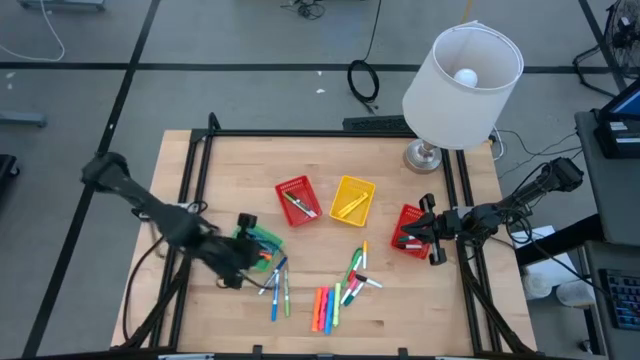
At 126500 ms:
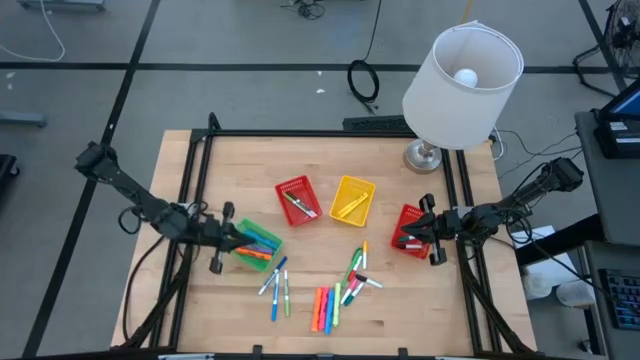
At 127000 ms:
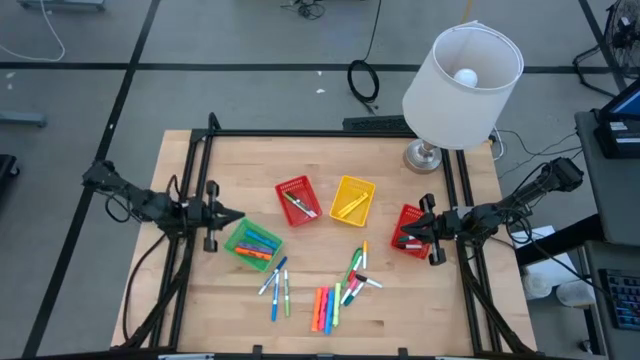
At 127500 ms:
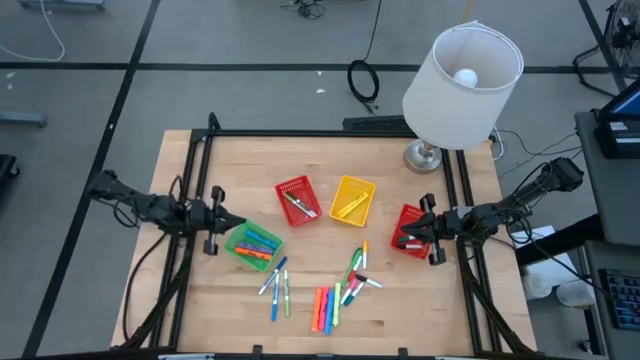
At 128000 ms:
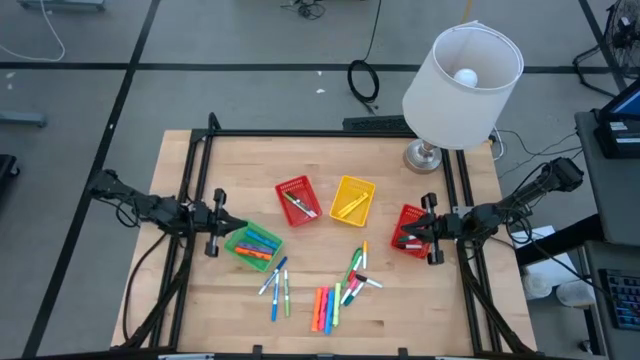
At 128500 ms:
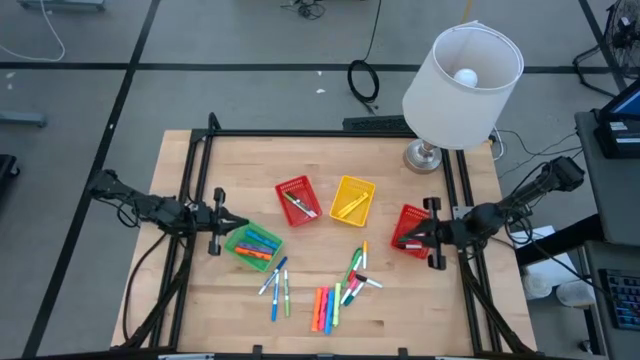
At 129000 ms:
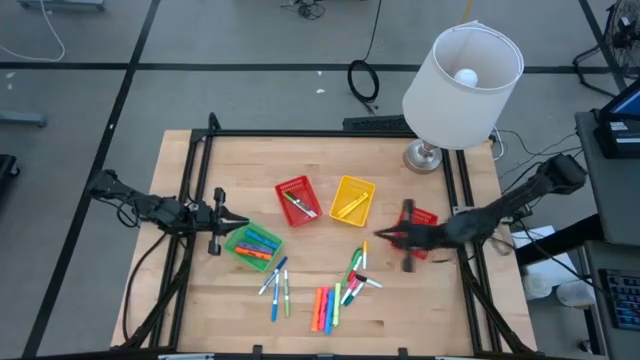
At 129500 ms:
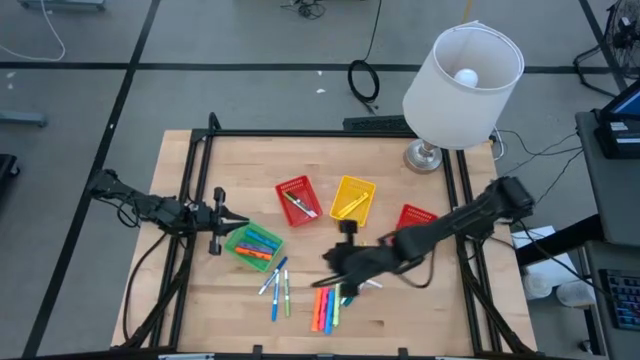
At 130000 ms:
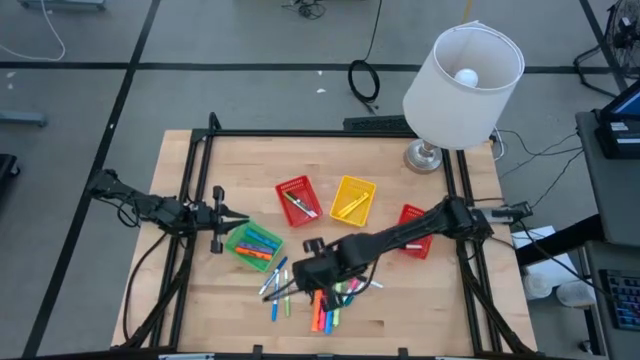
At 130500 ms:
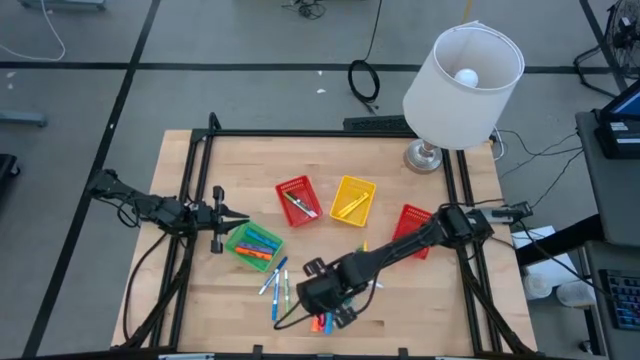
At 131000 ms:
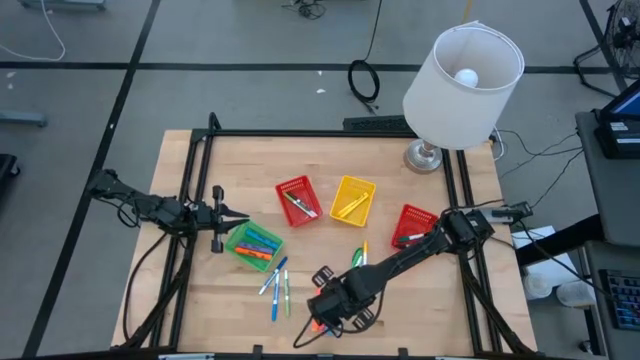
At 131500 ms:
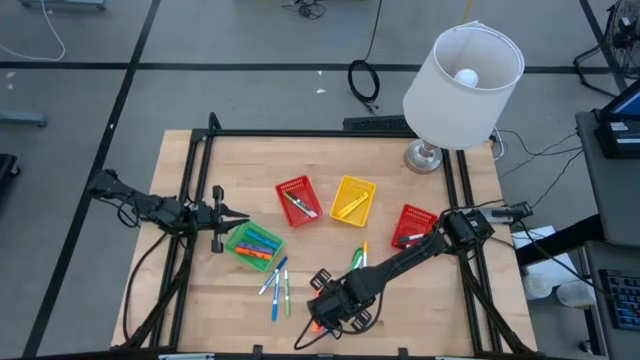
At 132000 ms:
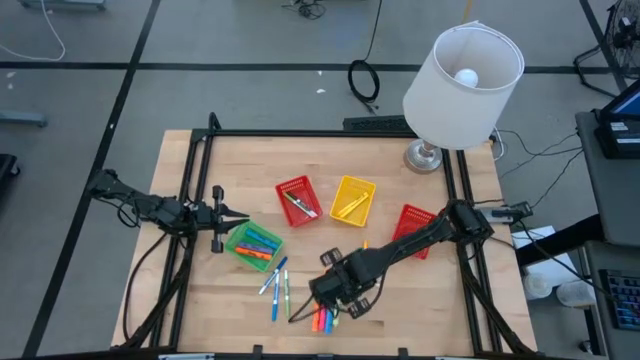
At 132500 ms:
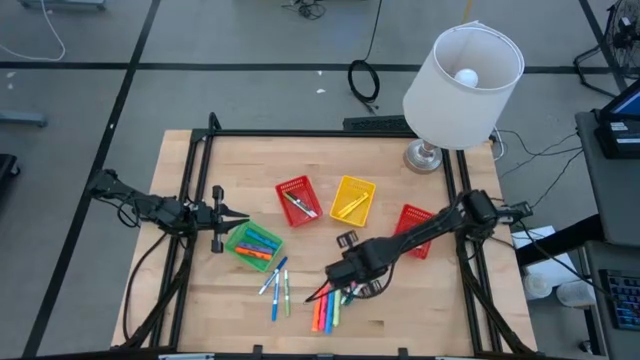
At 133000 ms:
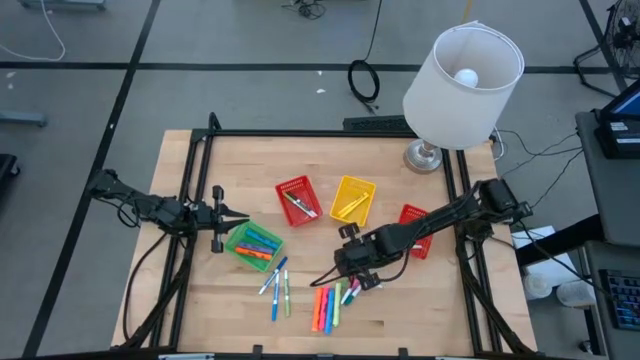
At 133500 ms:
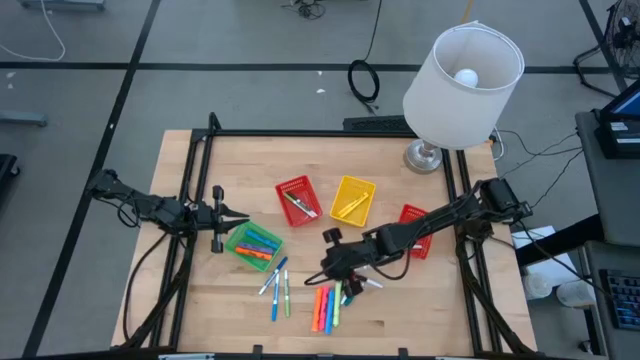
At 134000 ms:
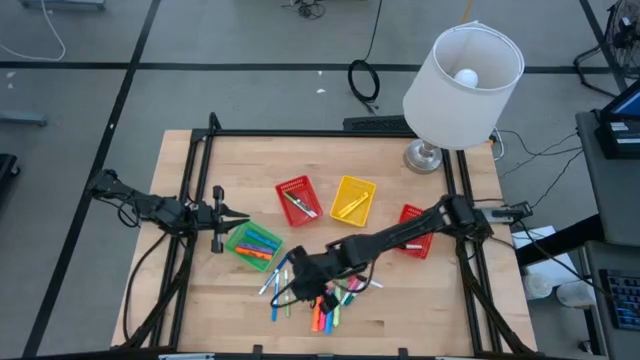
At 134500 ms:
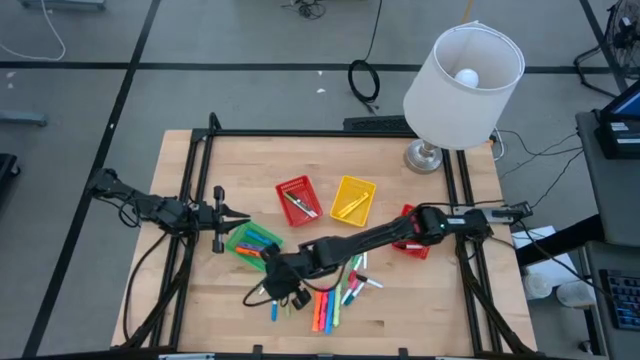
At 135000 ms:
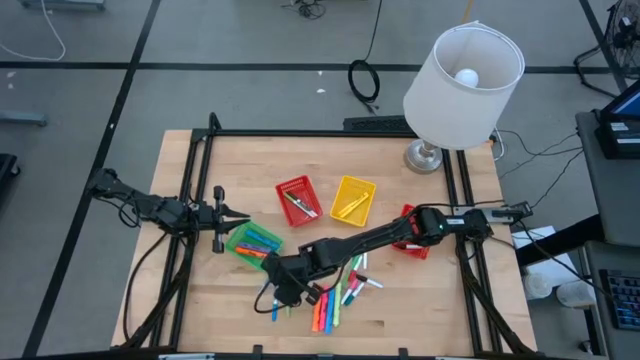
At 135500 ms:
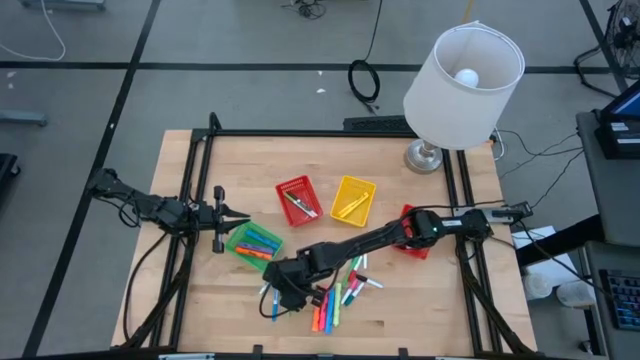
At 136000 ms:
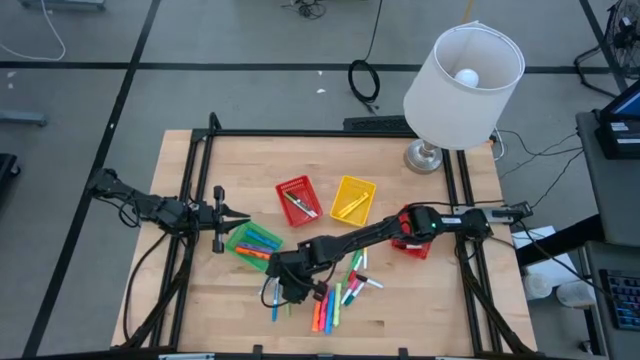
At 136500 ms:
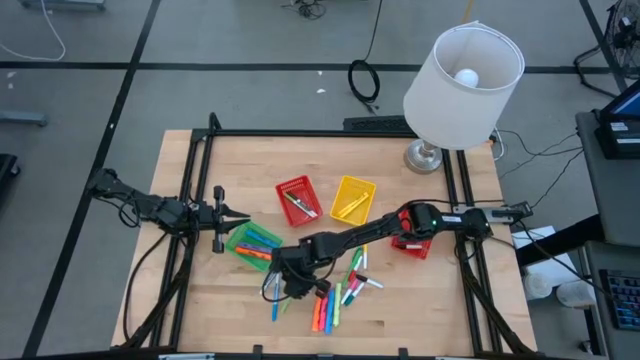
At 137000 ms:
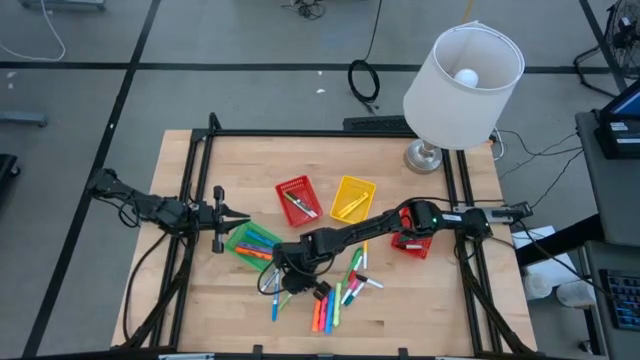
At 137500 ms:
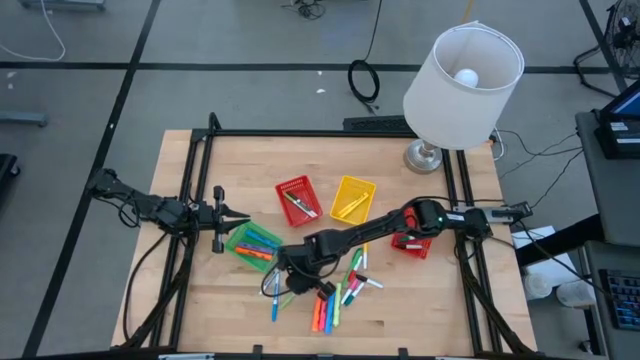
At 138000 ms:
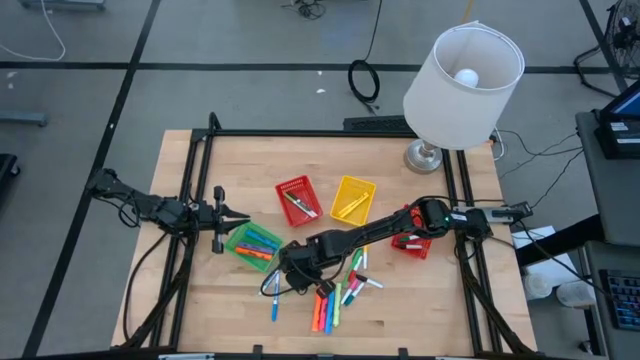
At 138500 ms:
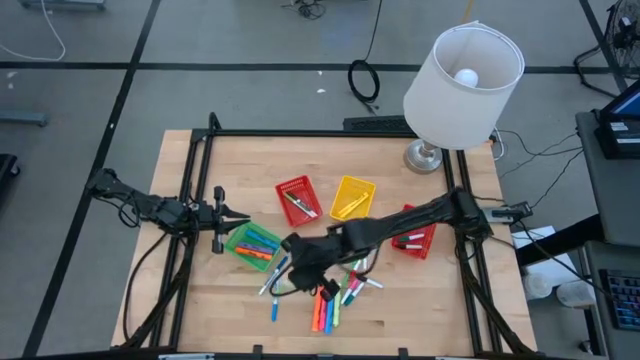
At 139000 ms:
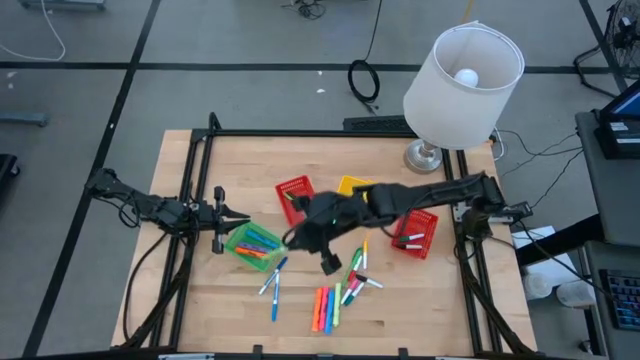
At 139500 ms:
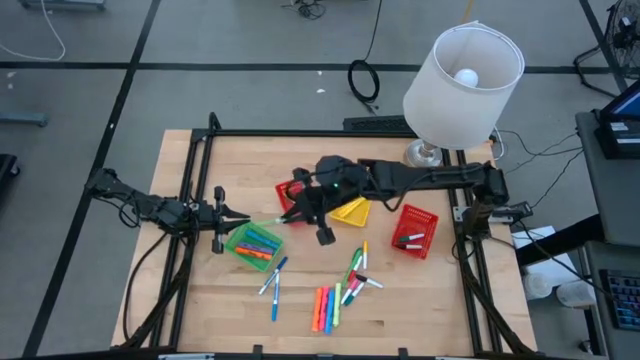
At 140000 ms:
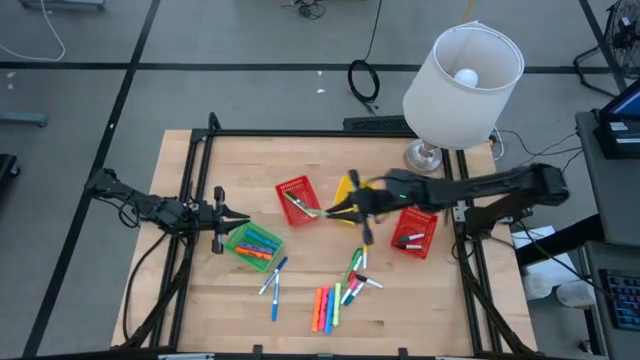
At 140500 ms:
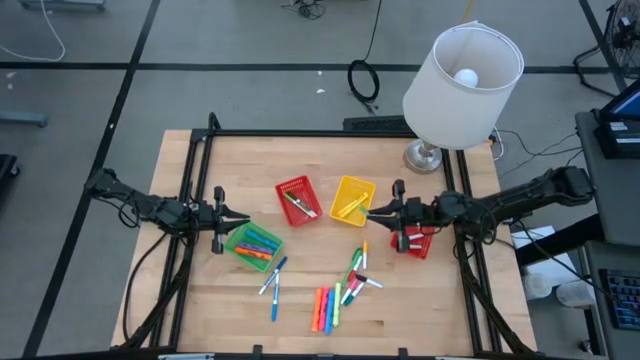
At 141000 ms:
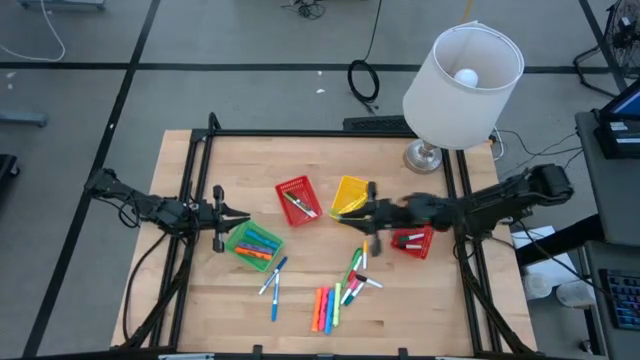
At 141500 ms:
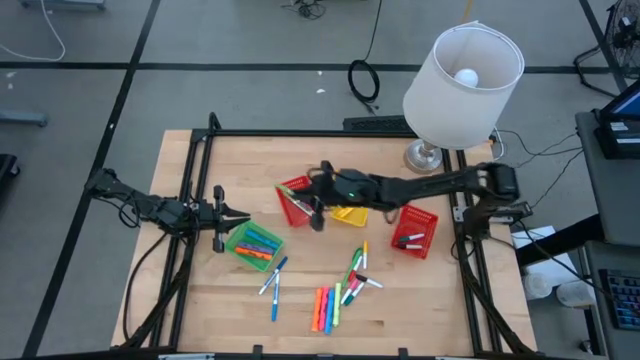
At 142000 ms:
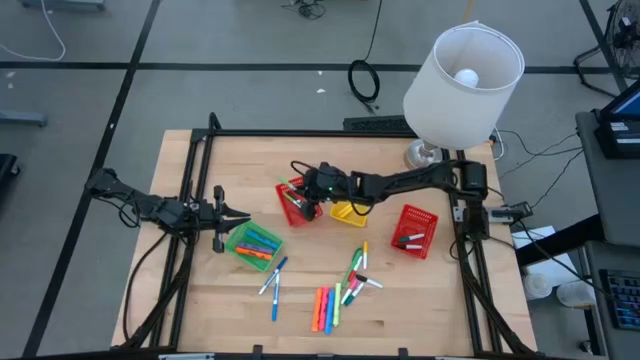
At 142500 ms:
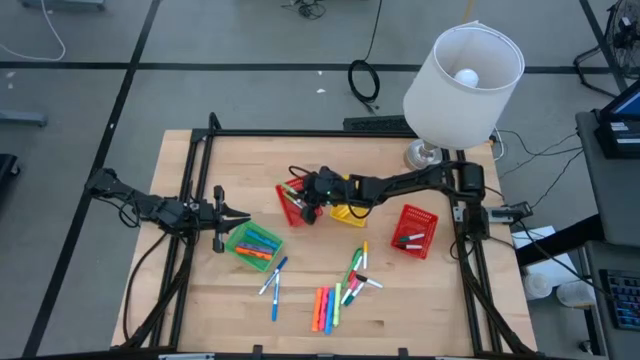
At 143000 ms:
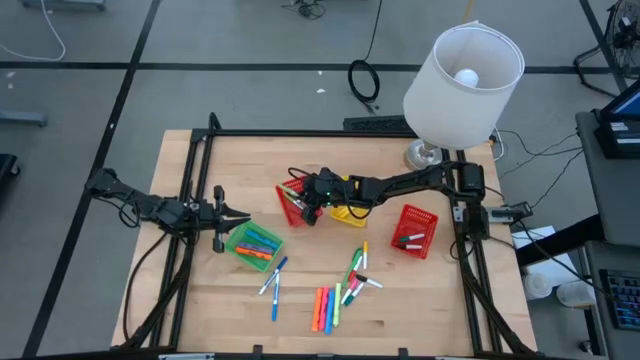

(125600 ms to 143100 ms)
Task: Pick & Place Markers
Put the green marker into the left red bin

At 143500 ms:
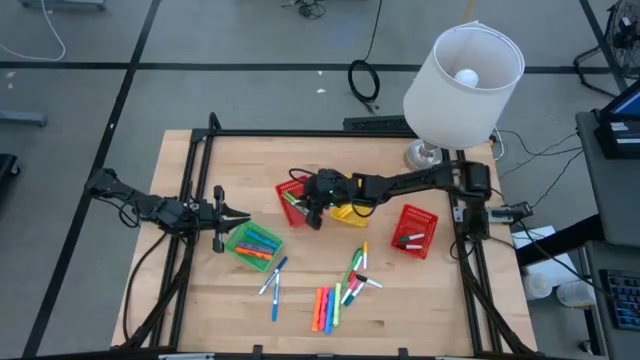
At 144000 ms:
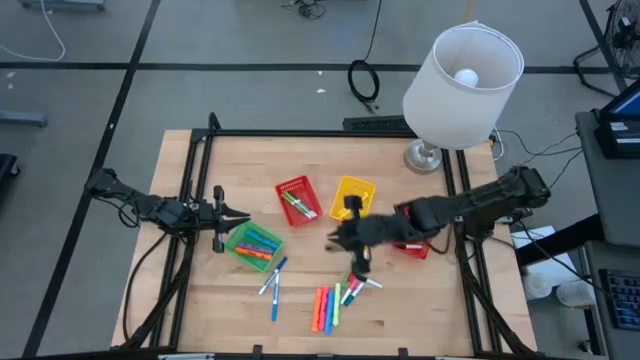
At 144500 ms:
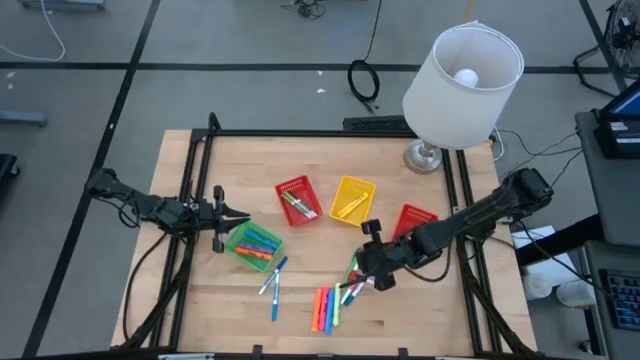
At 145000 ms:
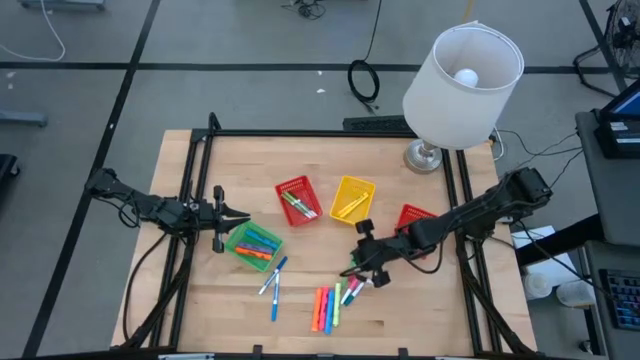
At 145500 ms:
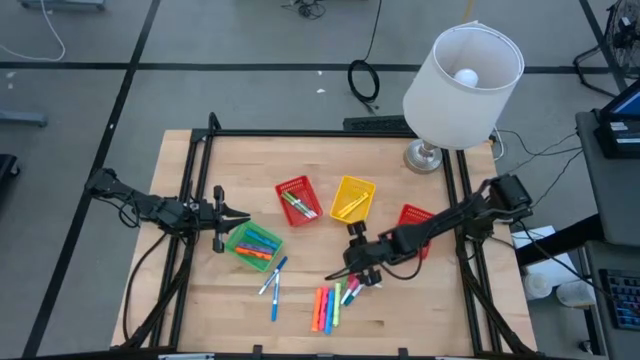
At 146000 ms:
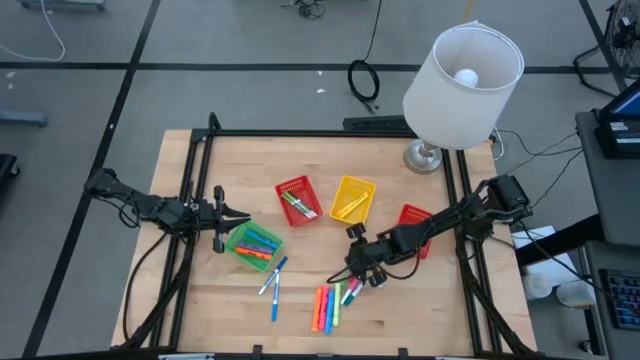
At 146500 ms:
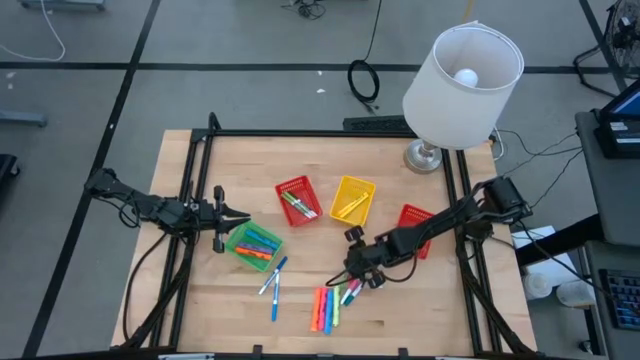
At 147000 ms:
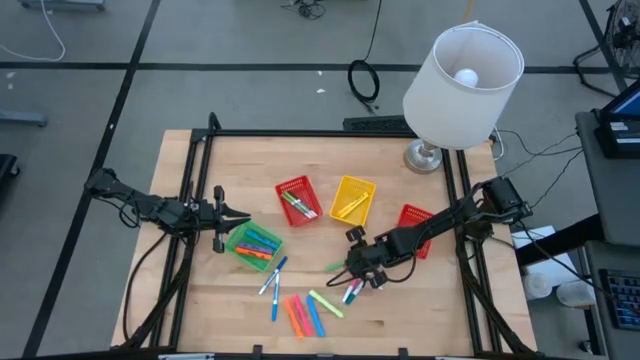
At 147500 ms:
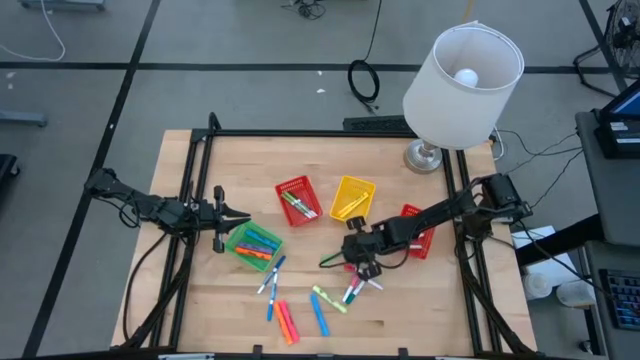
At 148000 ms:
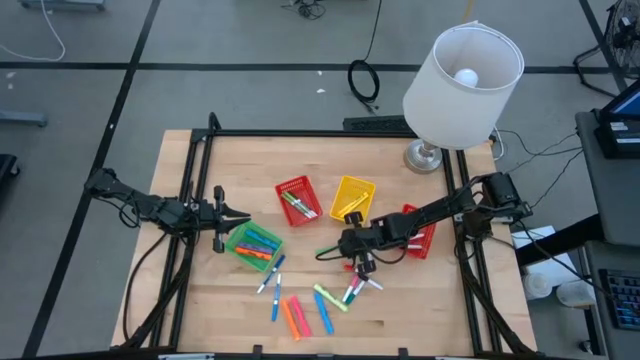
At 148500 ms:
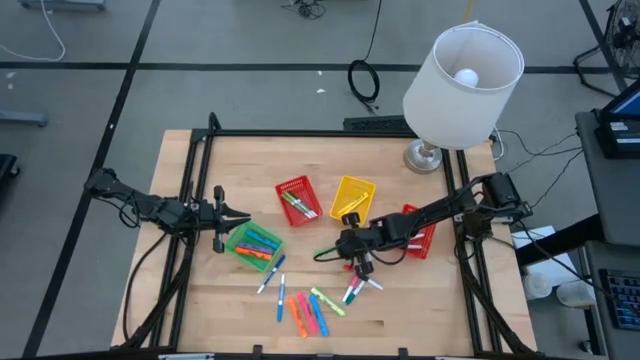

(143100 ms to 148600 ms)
Put the green pen into the yellow bin
